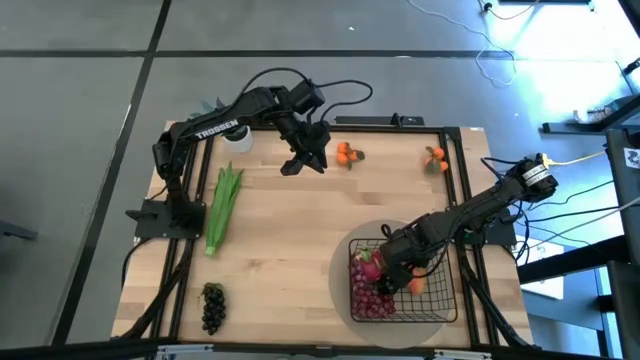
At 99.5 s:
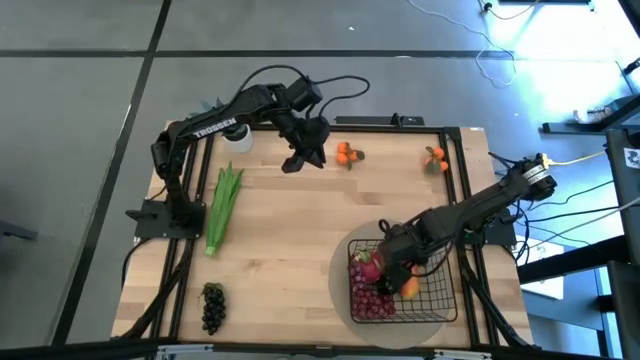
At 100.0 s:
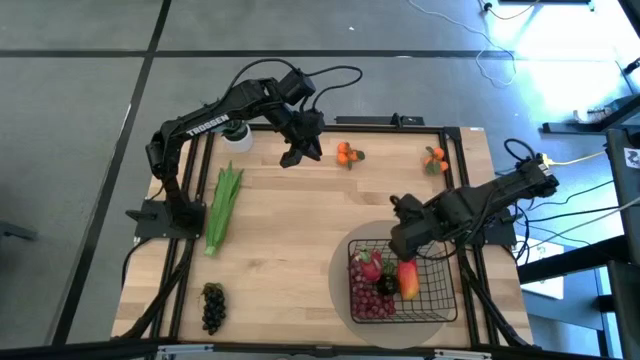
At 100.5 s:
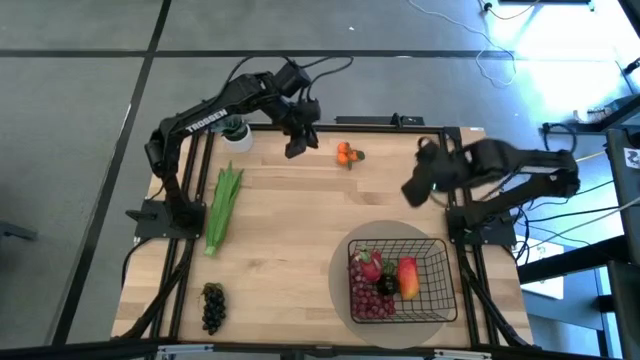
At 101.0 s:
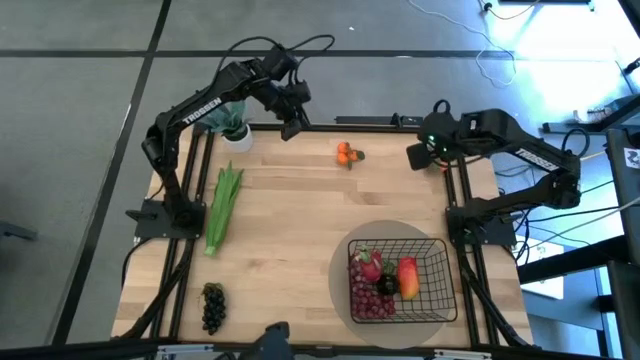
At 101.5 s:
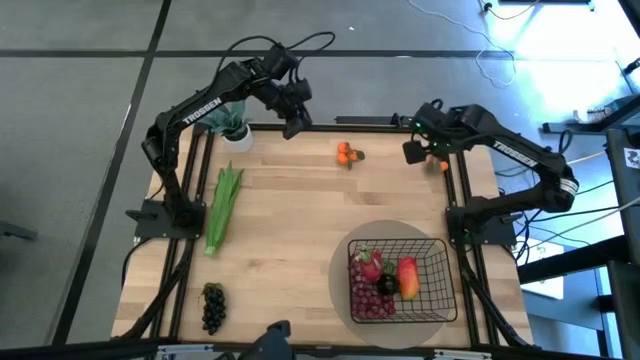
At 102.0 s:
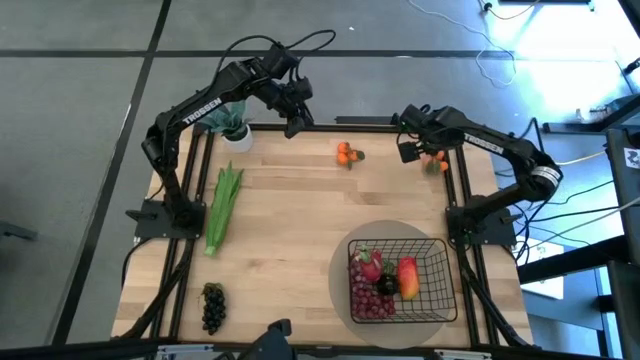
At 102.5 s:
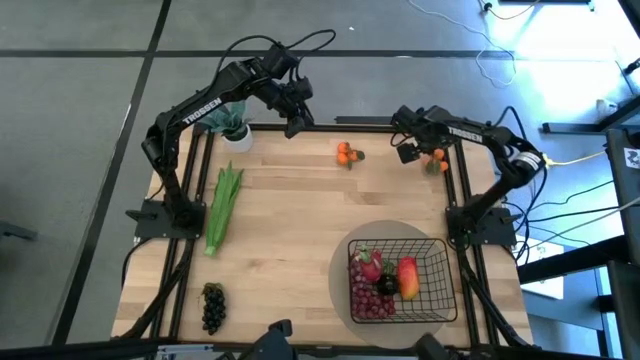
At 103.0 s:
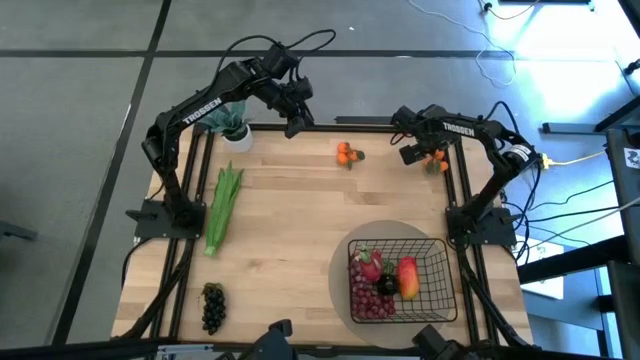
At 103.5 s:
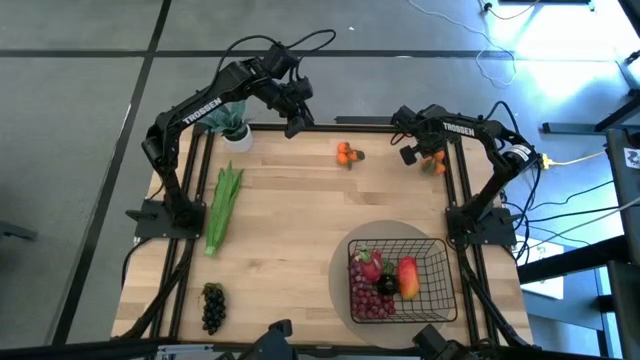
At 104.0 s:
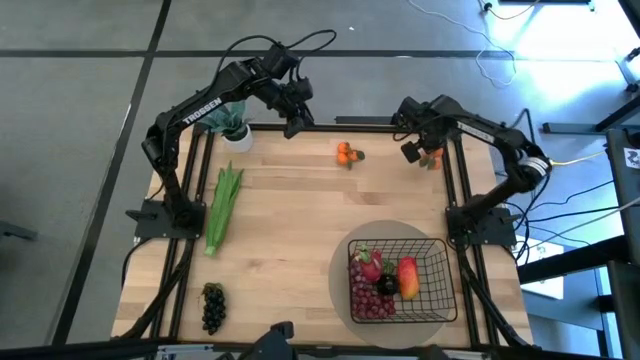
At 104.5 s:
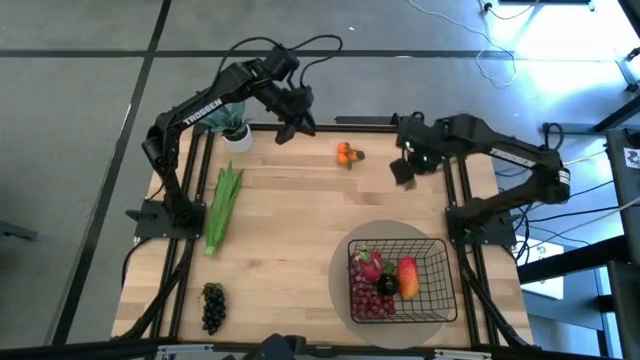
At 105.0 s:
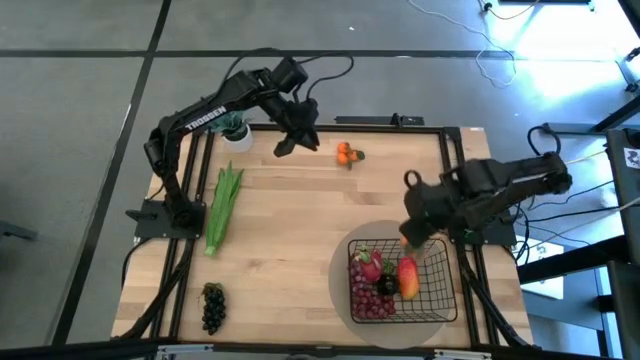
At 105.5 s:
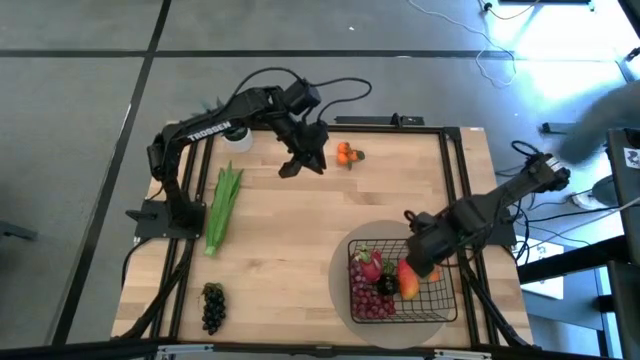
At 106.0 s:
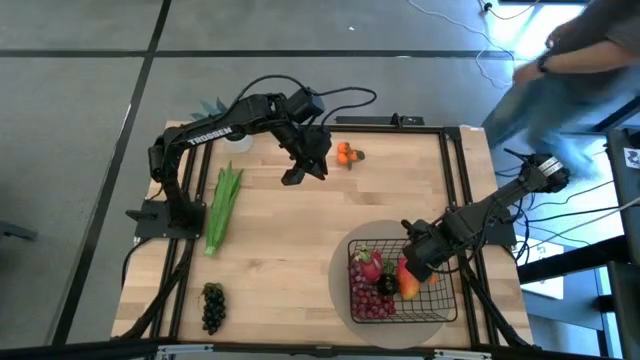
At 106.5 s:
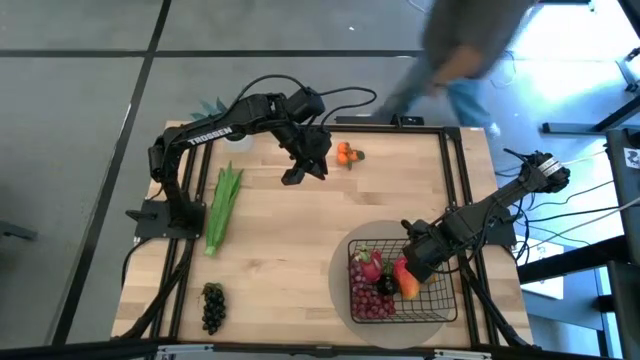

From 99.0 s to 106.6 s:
Task: Build produce basket
Put the right orange tangerines into the black wire basket

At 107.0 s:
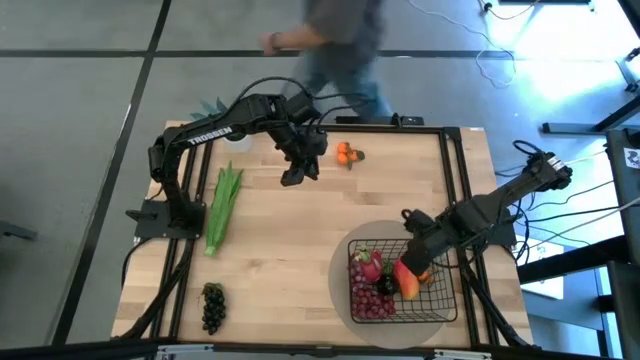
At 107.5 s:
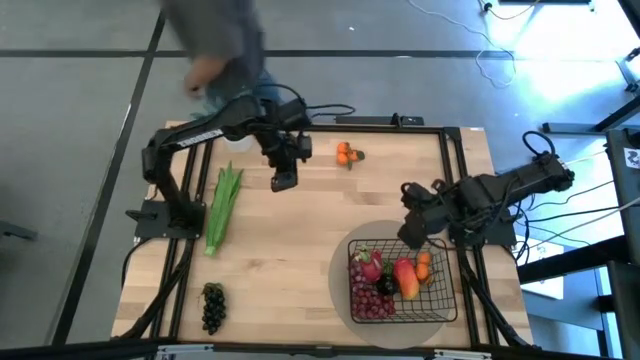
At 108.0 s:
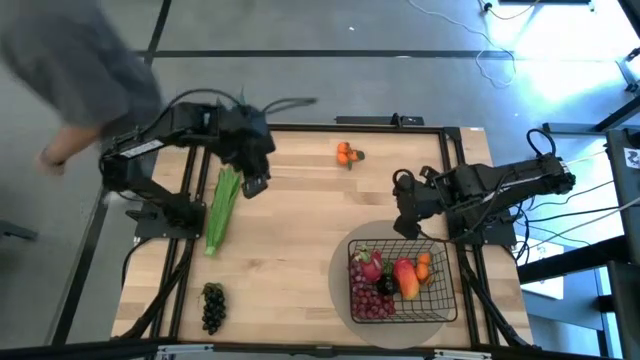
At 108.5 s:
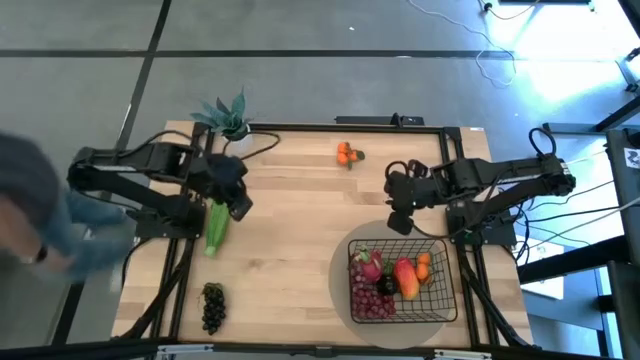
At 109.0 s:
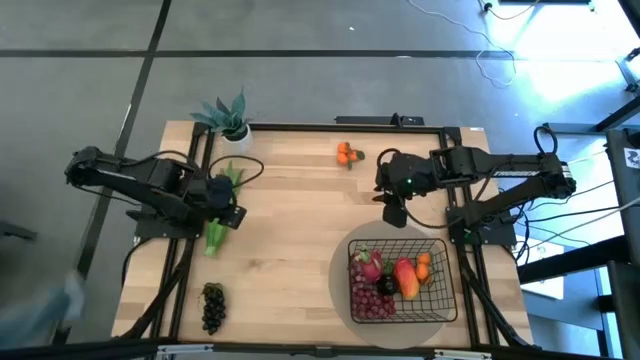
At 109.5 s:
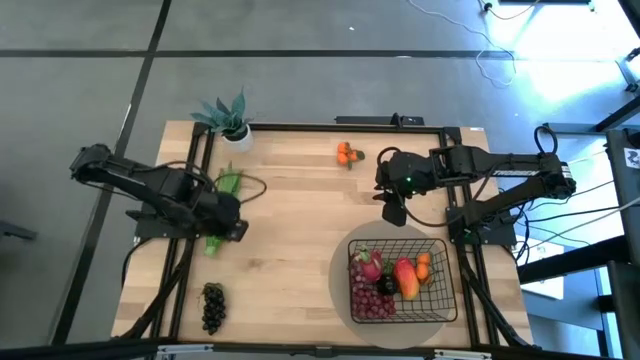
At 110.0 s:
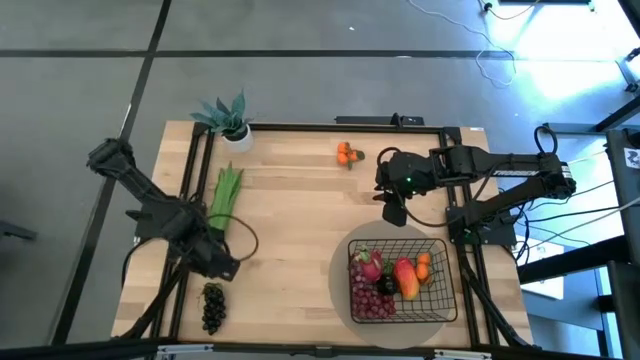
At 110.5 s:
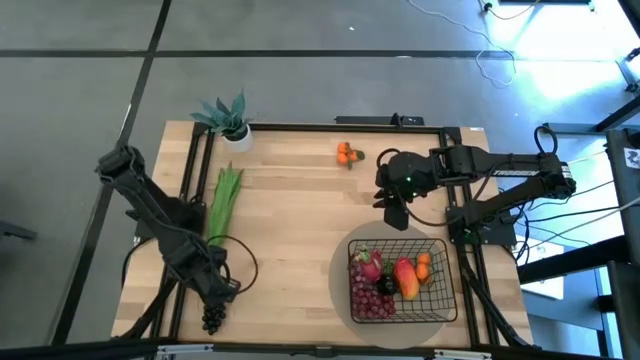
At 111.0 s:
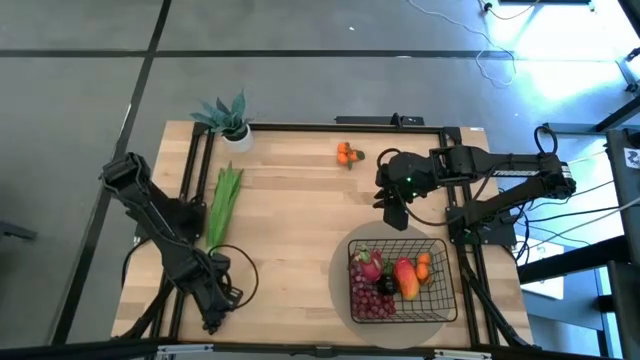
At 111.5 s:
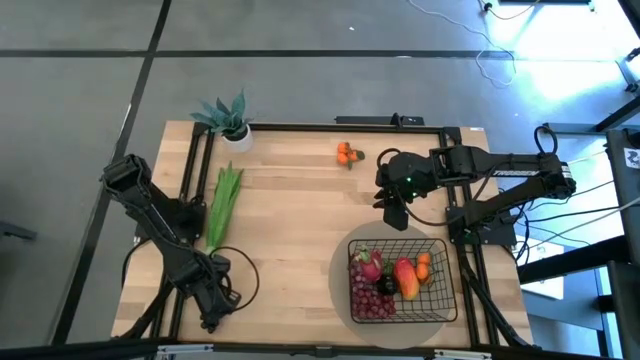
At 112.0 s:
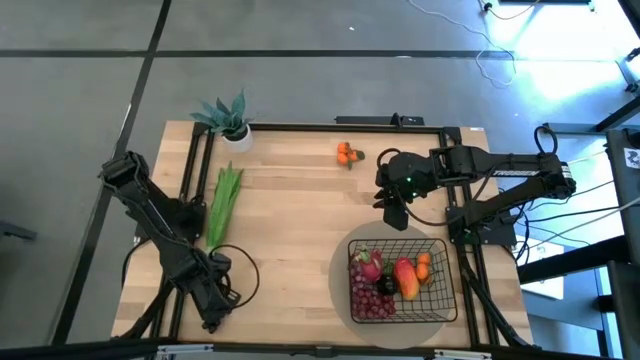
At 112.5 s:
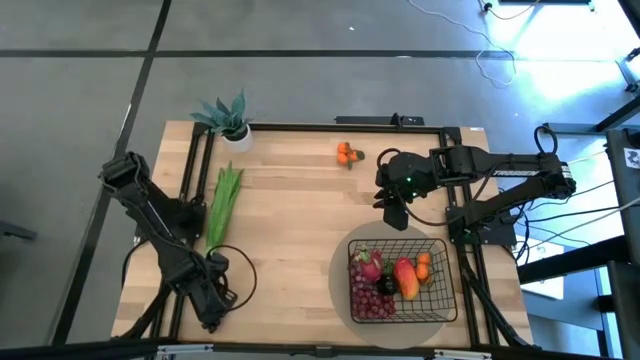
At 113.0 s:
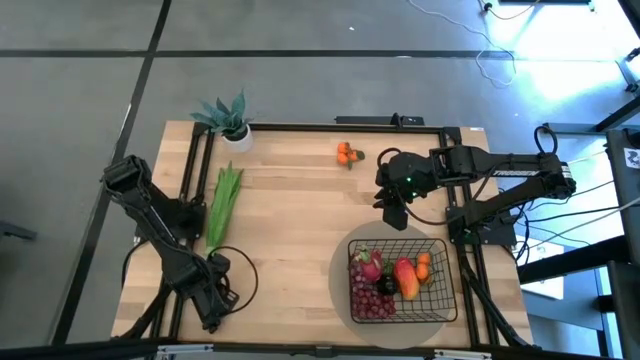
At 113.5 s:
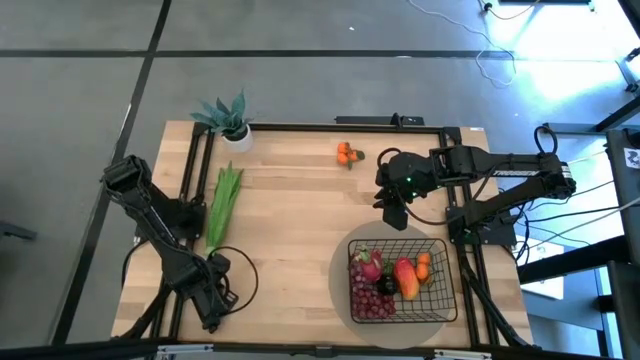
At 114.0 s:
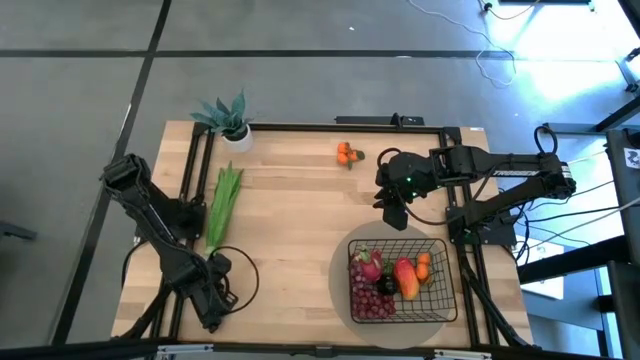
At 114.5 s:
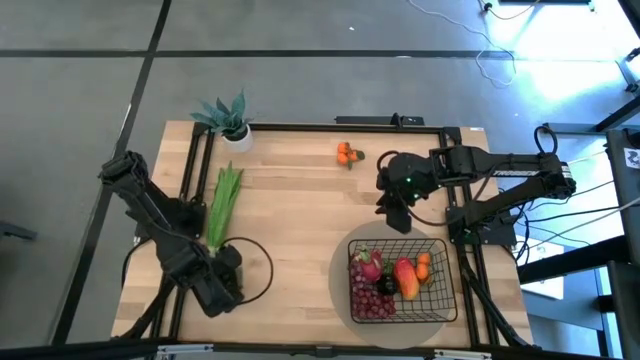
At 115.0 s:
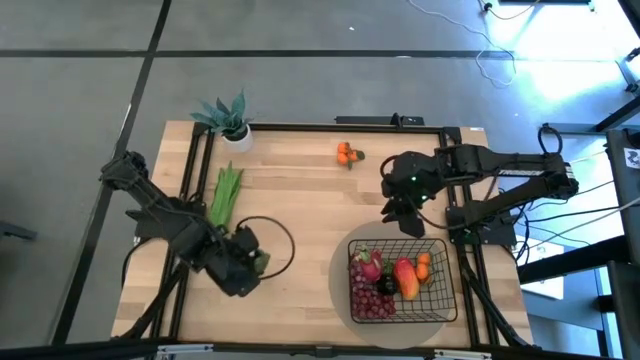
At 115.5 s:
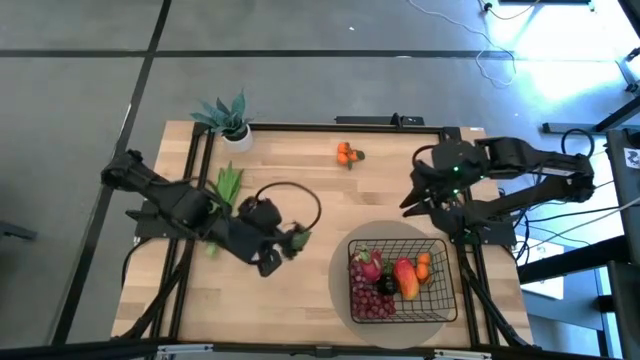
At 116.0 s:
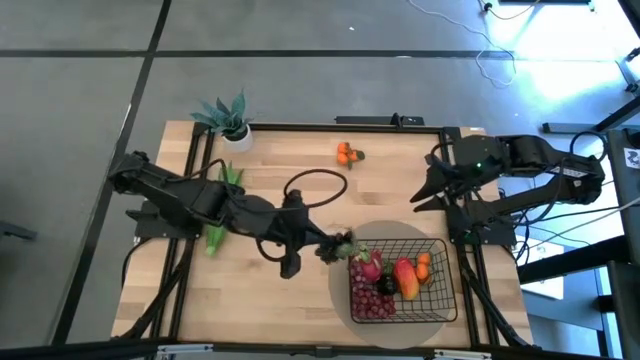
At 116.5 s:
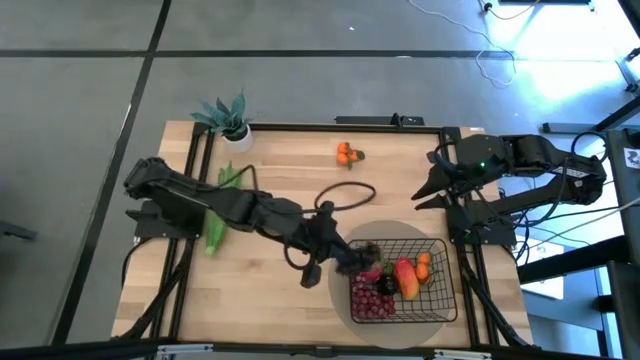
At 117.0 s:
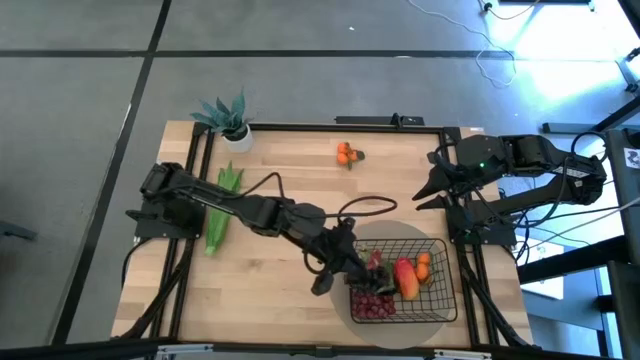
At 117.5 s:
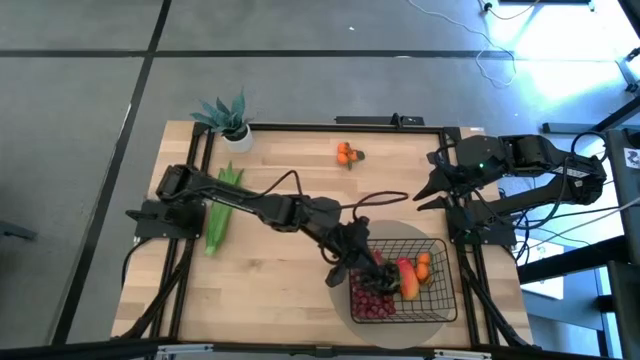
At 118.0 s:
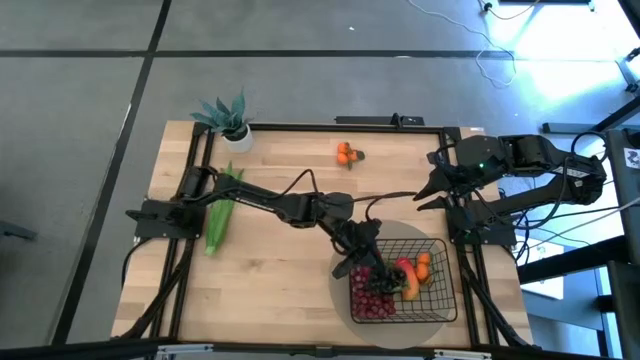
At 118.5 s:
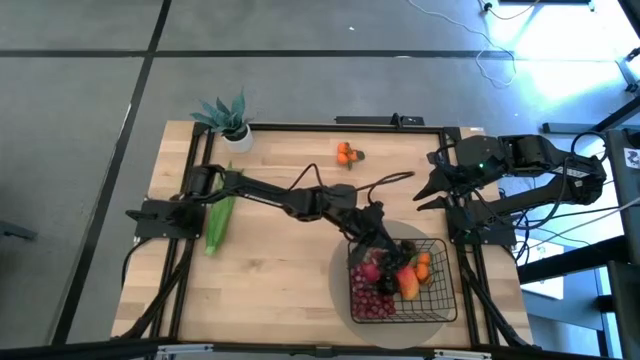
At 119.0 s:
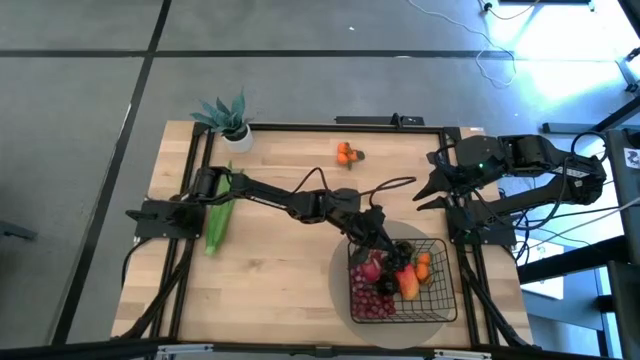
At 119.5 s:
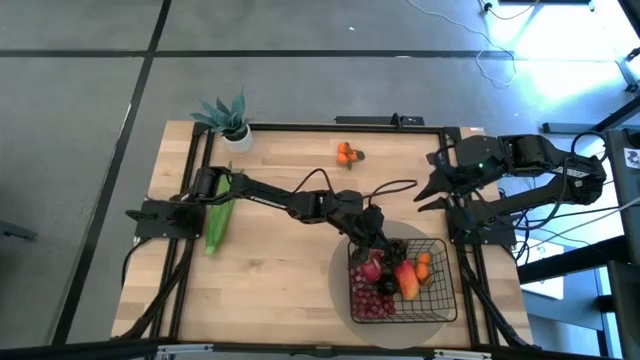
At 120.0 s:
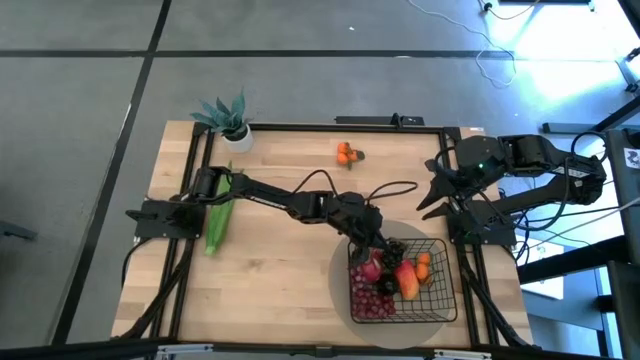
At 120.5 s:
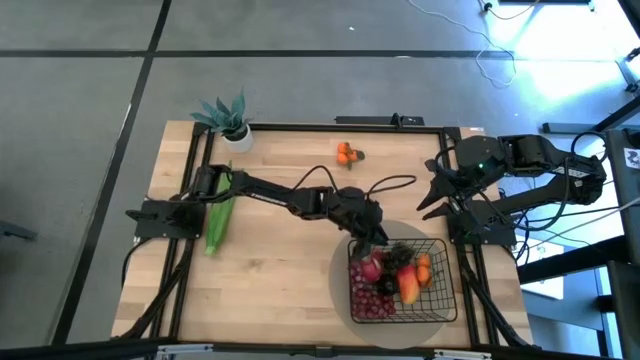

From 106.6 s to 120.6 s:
Put the black grapes into the black wire basket
